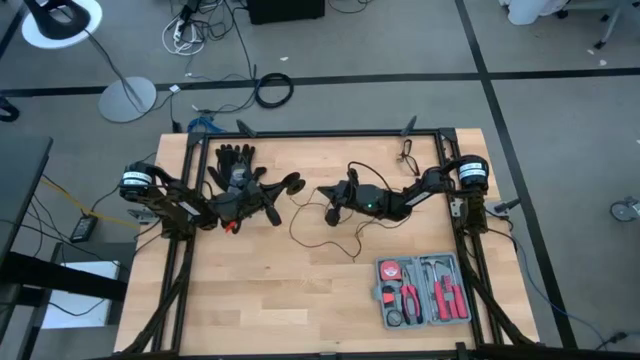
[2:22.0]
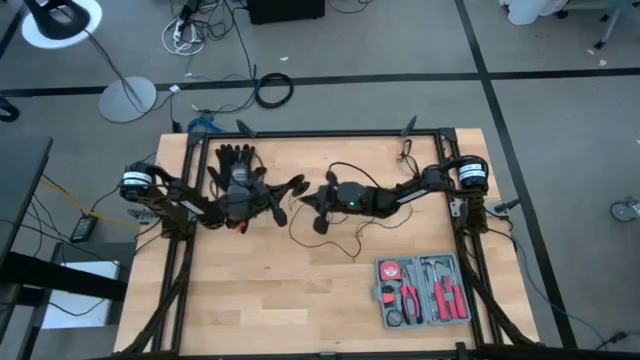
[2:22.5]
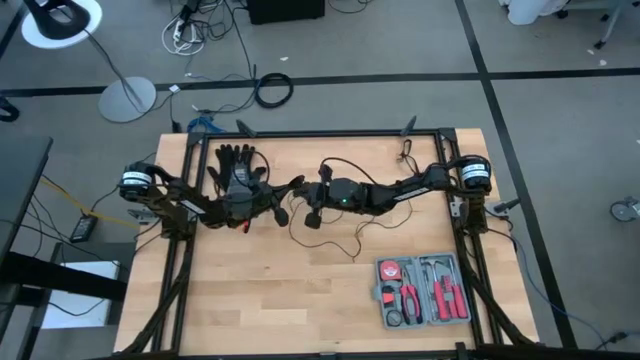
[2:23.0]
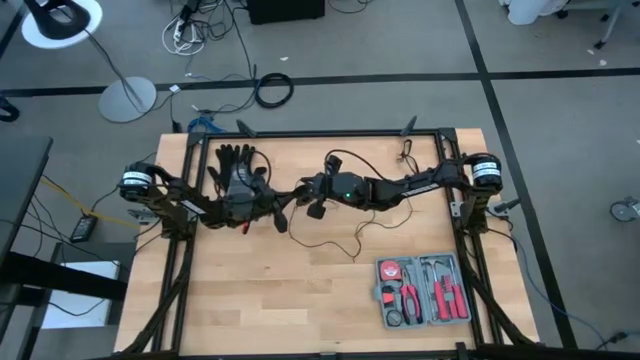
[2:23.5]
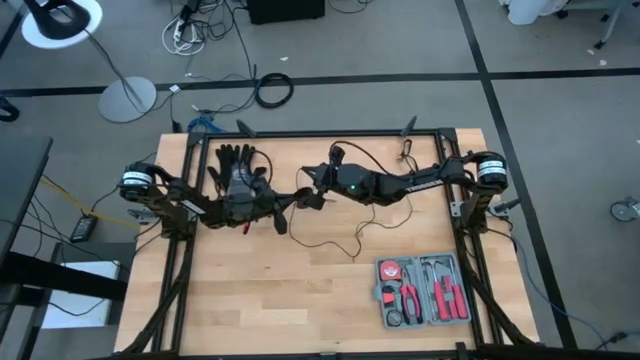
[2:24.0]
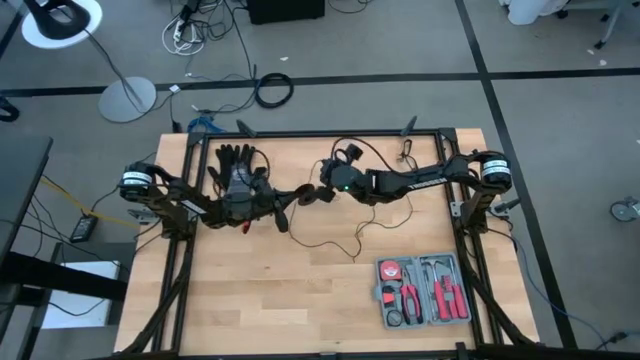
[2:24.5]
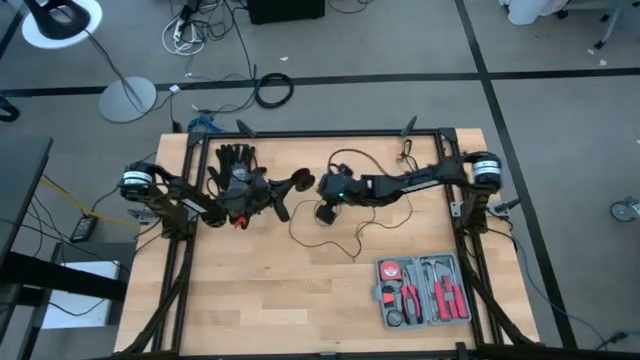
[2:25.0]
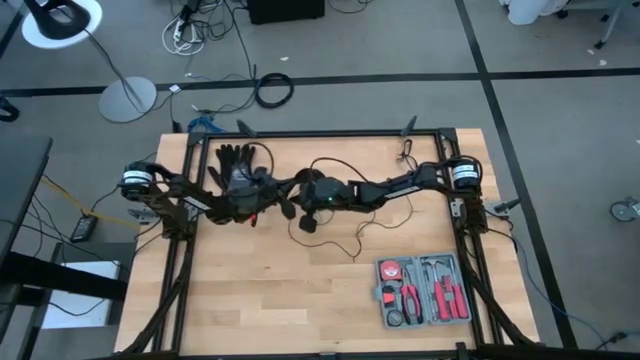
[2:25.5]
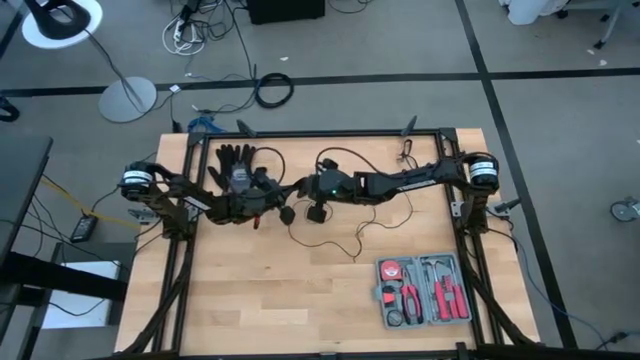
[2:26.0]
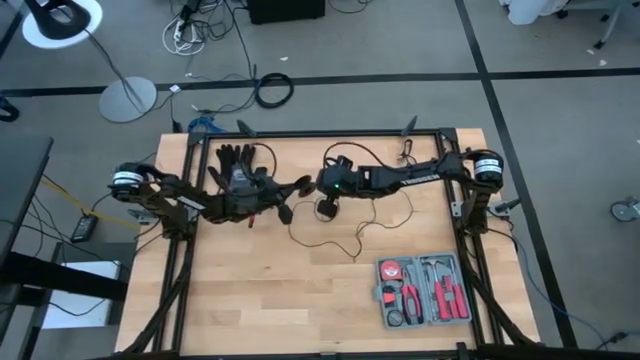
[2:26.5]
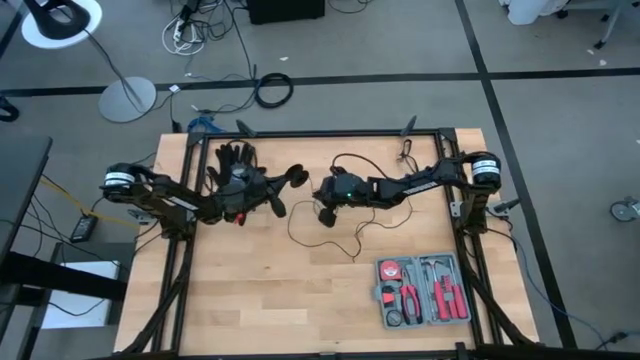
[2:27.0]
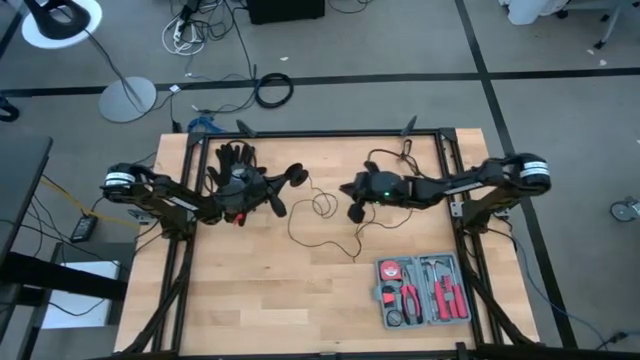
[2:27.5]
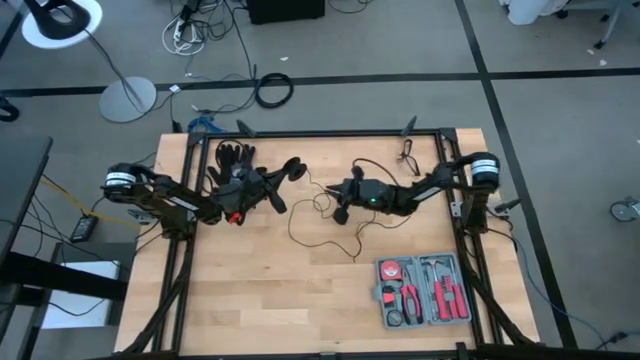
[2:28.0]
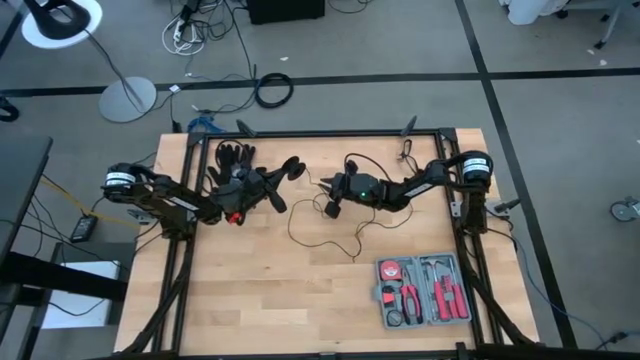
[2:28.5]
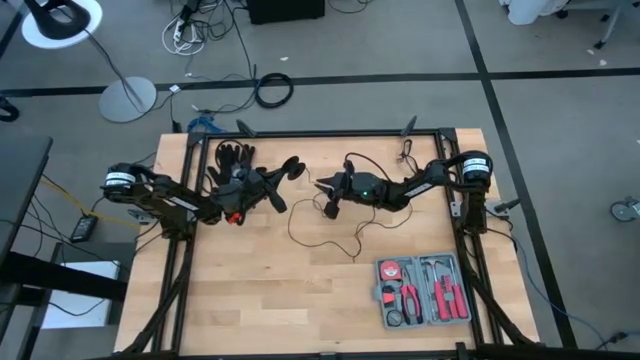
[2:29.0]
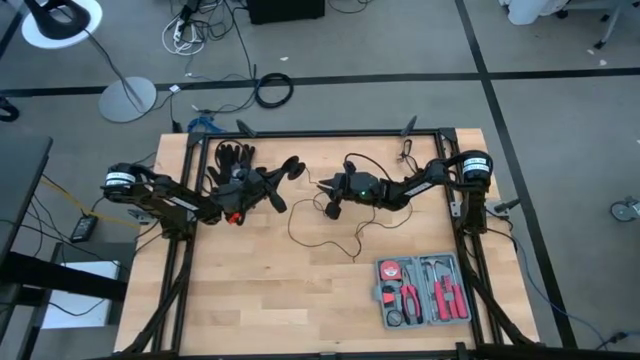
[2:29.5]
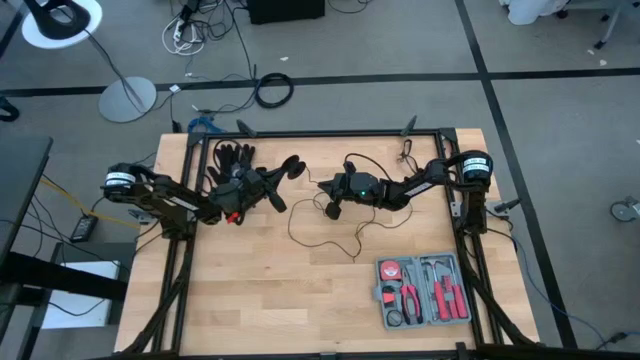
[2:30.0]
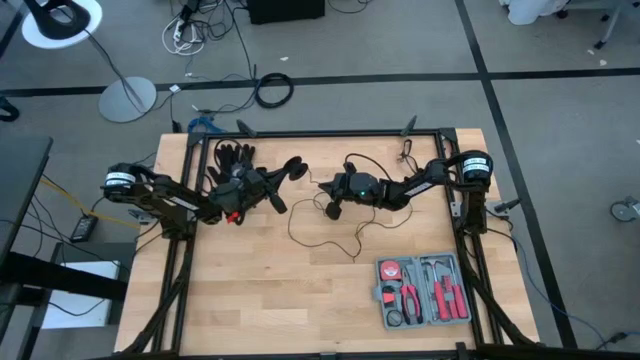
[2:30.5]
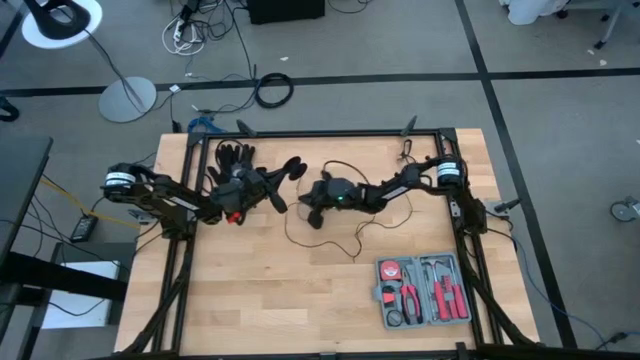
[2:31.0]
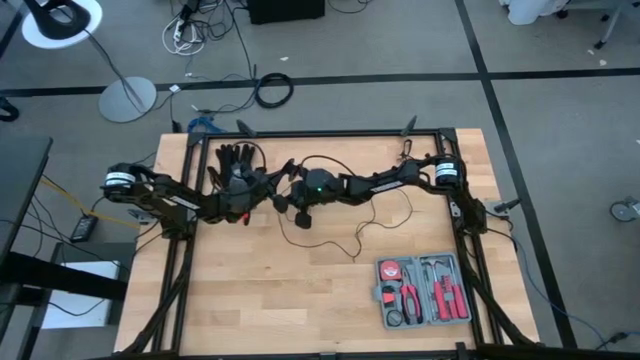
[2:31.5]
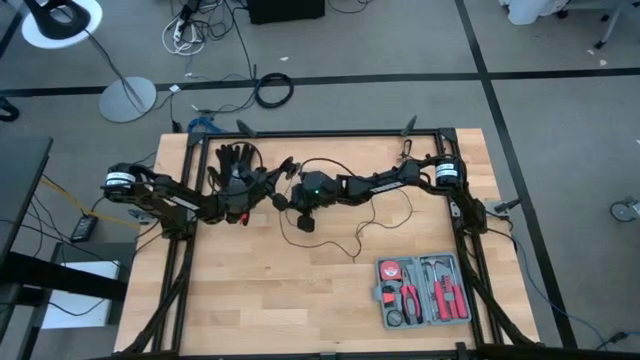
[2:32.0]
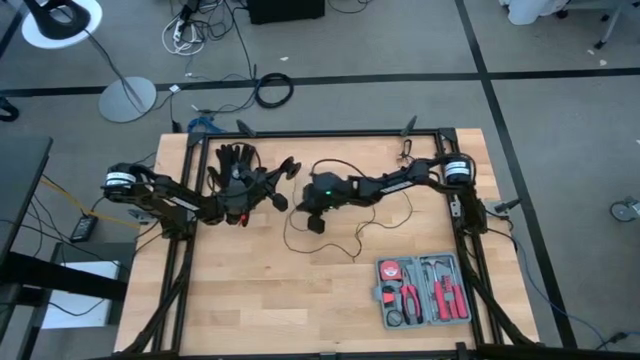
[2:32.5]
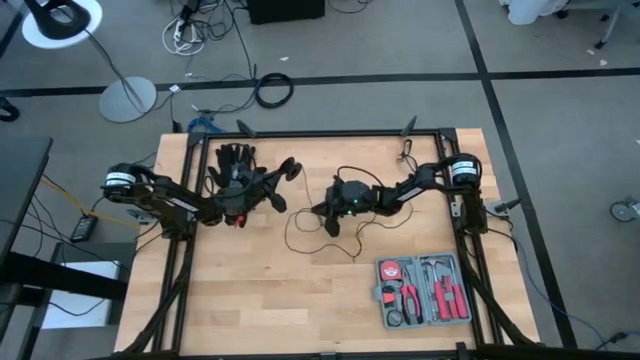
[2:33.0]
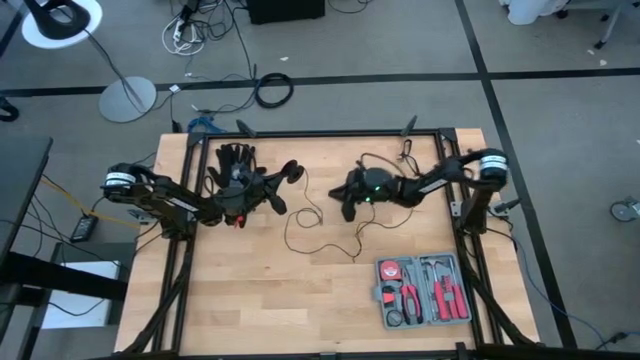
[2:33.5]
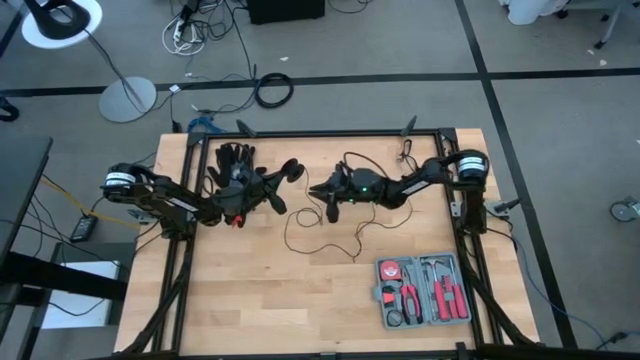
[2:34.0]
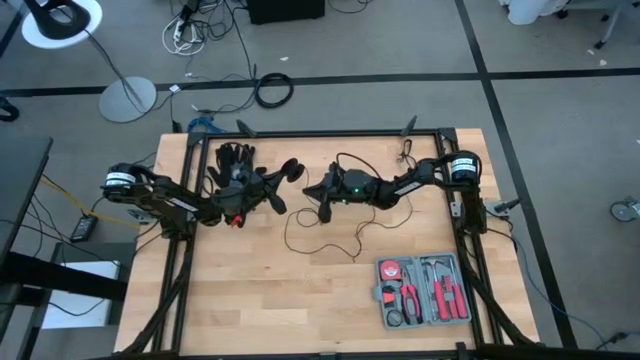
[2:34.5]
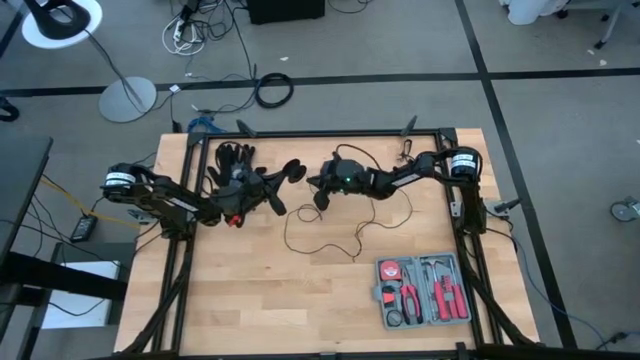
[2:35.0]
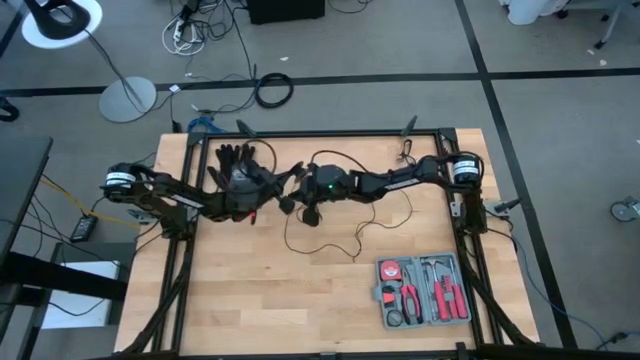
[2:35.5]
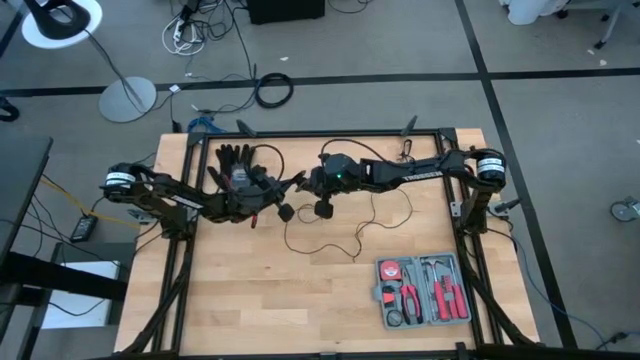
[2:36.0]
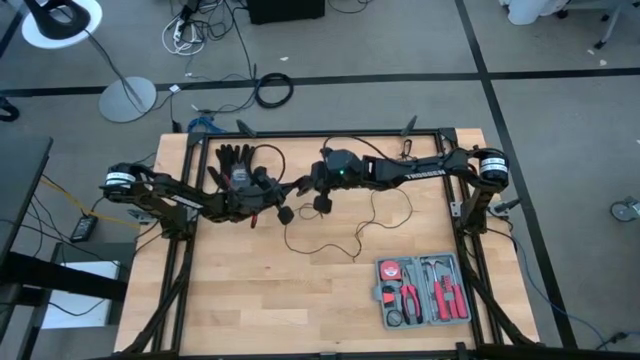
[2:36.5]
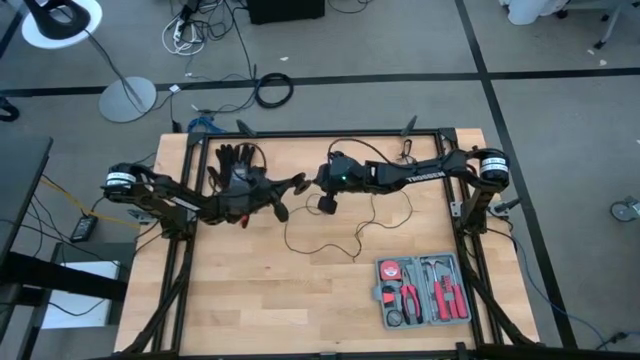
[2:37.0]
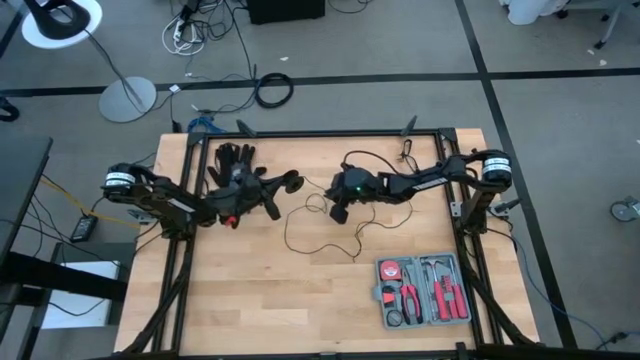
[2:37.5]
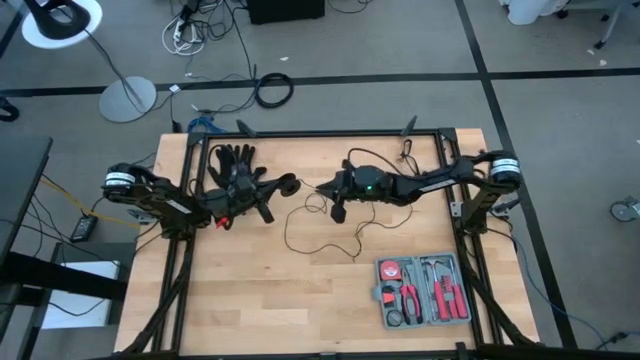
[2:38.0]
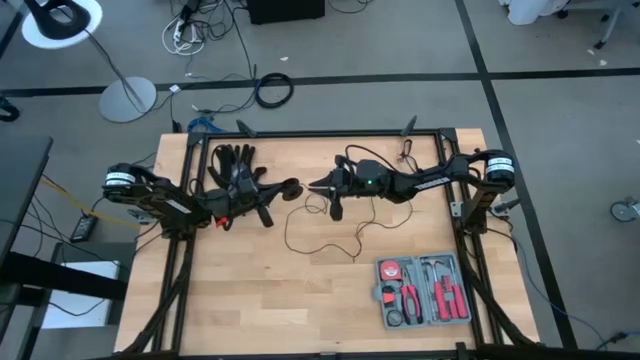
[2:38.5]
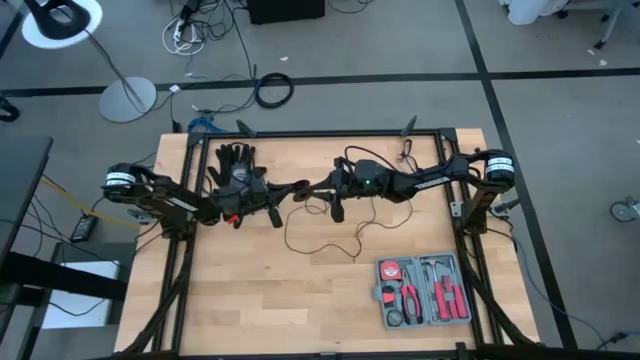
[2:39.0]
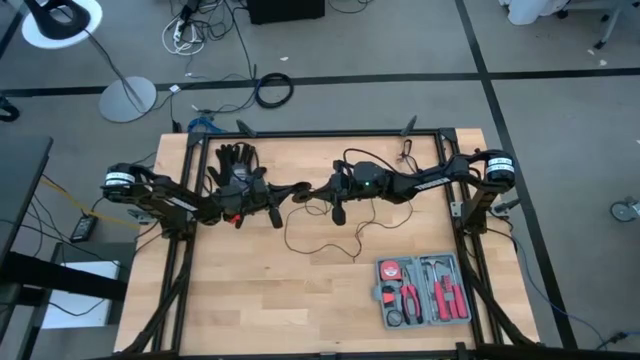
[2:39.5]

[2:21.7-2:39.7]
Task: Coil cords
Coil the black wire

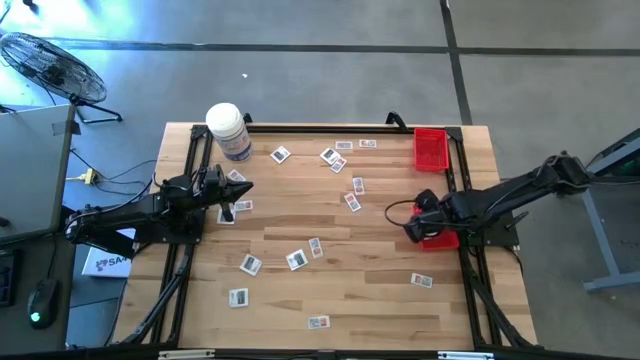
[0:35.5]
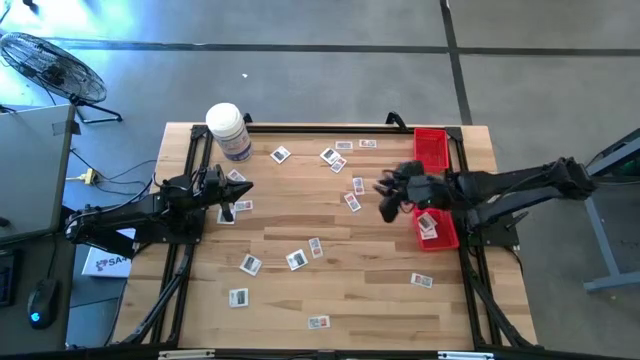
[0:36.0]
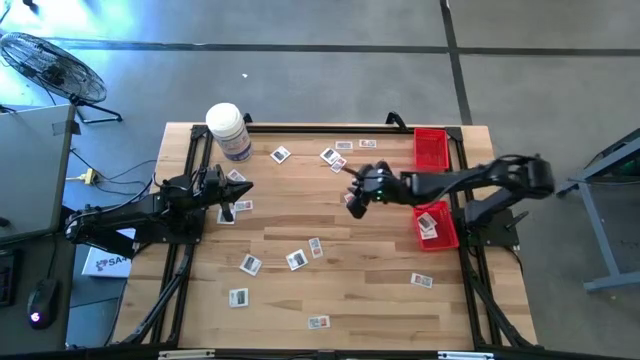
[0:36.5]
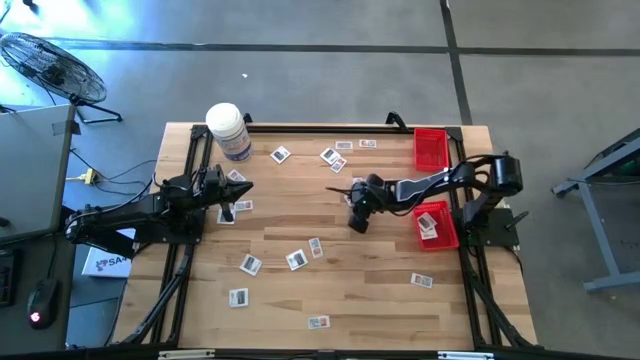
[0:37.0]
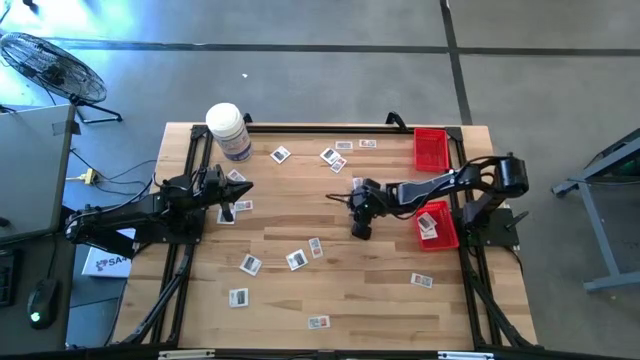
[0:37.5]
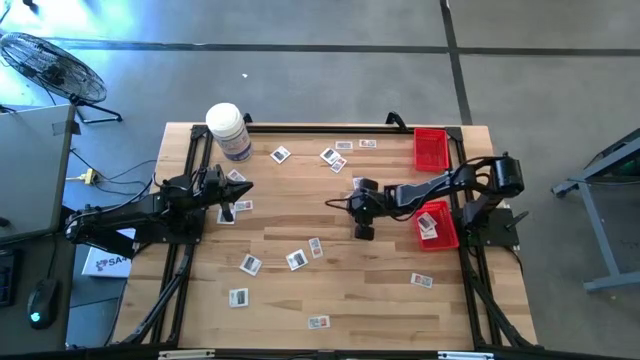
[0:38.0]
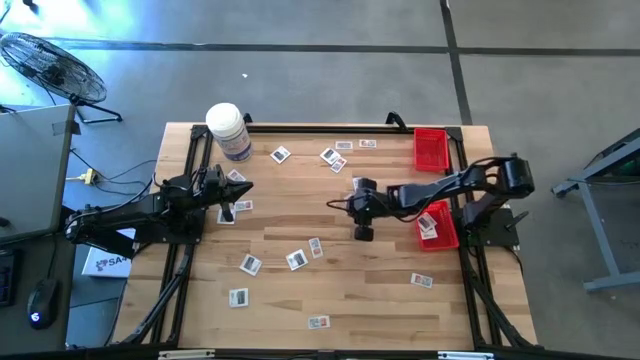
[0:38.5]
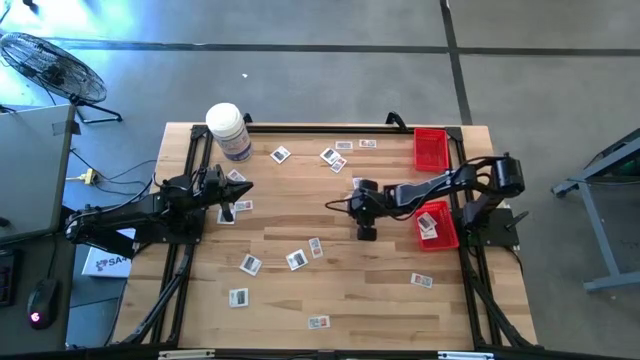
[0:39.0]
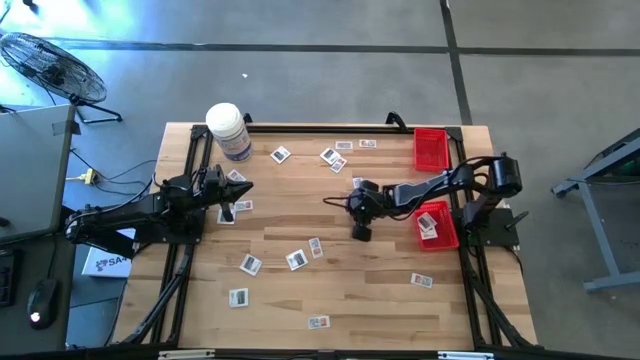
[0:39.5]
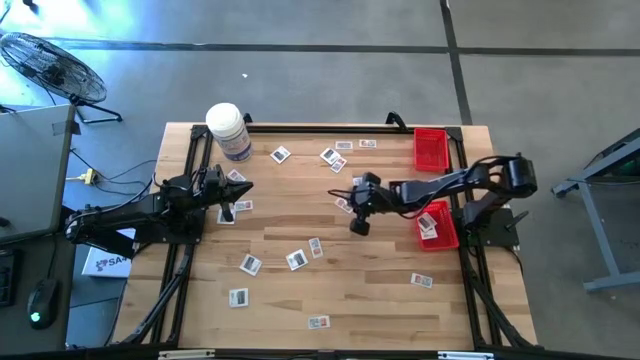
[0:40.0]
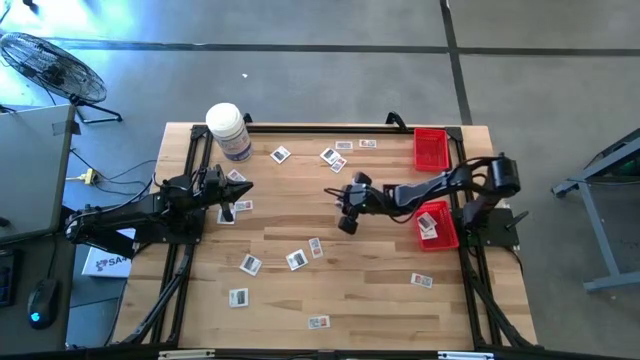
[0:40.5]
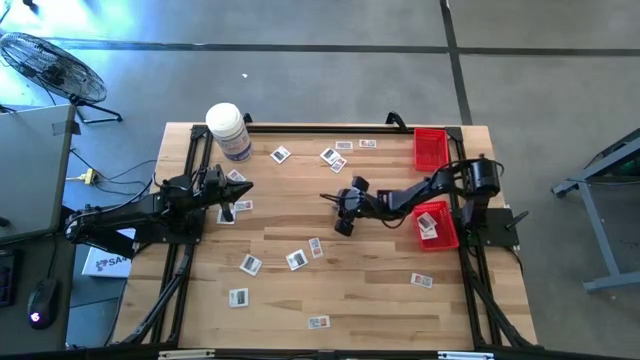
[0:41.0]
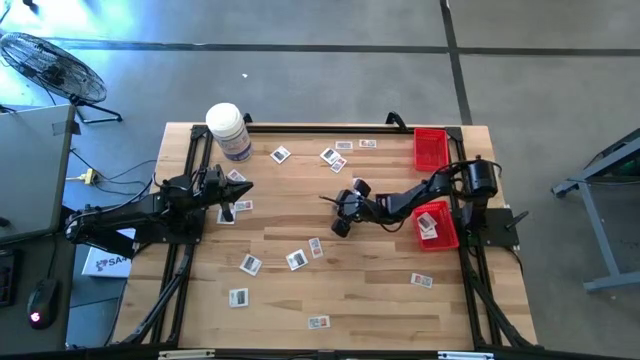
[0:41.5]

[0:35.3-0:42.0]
Task: Pick & Place First Aid Supplies
Put the ointment pack into the top basket
